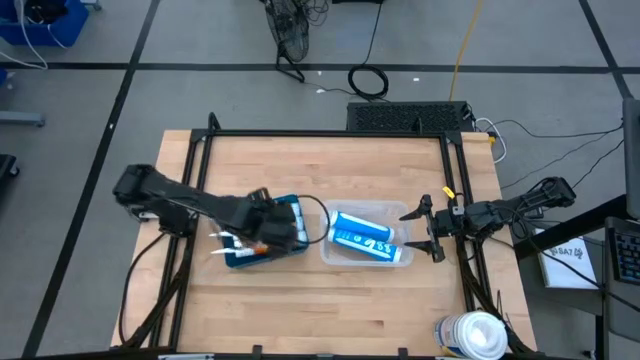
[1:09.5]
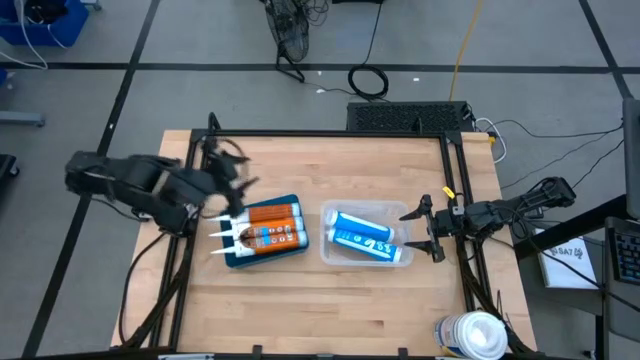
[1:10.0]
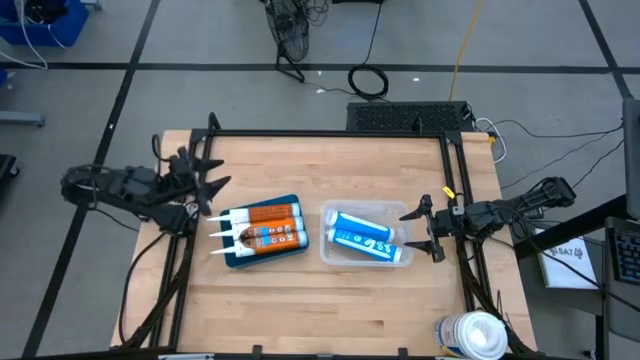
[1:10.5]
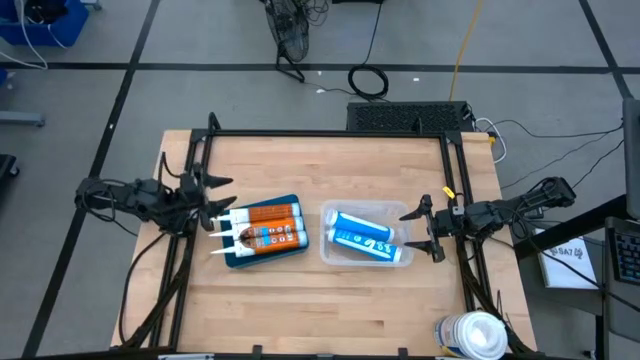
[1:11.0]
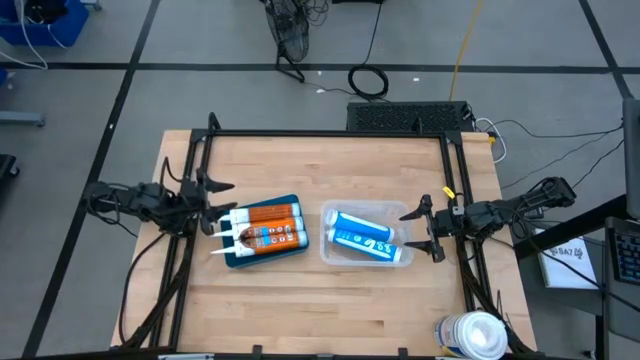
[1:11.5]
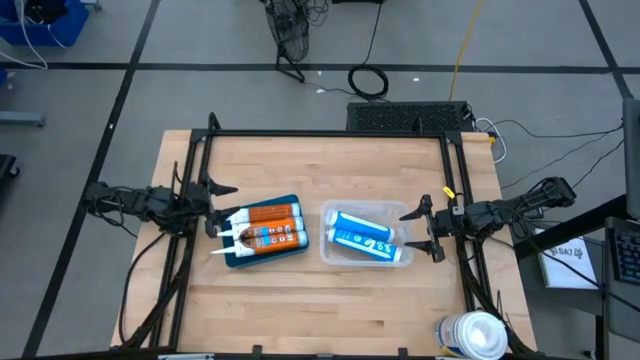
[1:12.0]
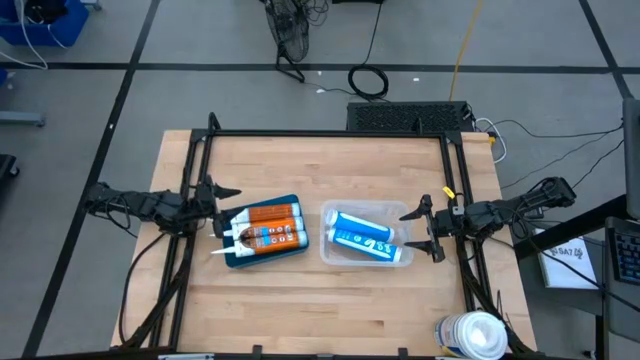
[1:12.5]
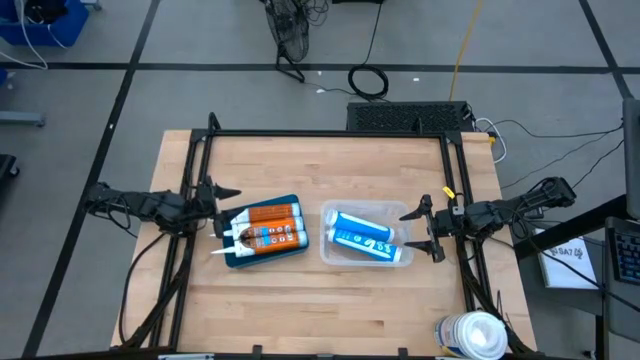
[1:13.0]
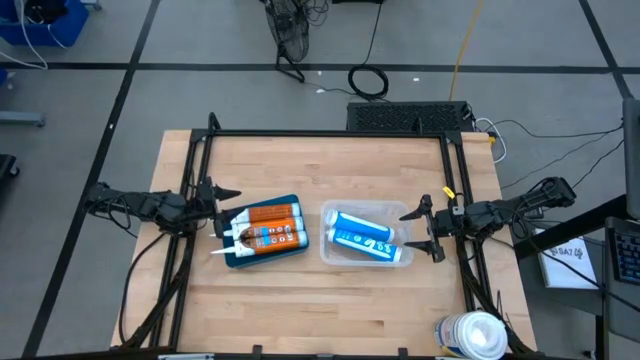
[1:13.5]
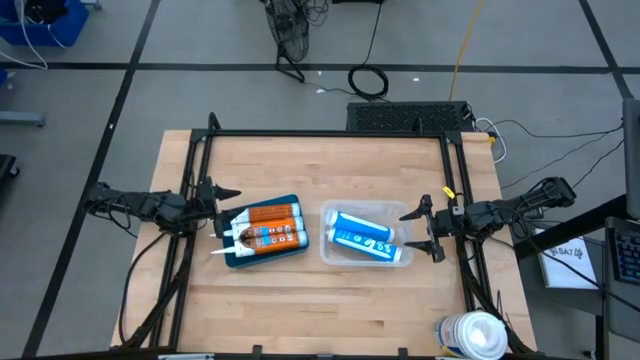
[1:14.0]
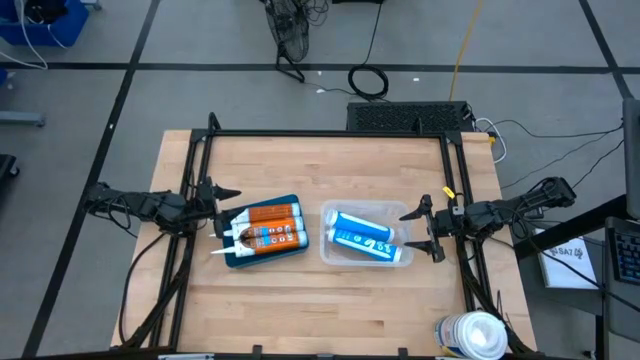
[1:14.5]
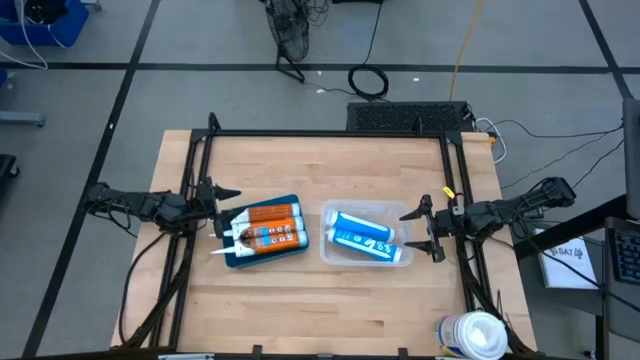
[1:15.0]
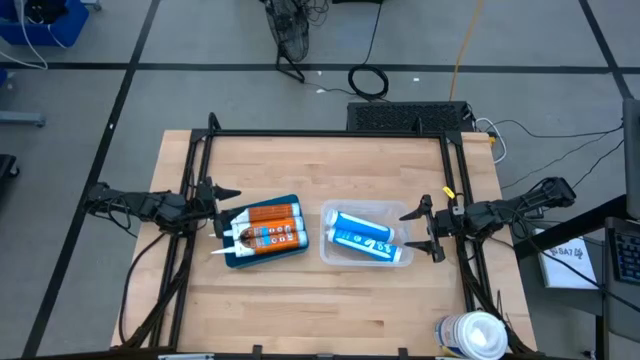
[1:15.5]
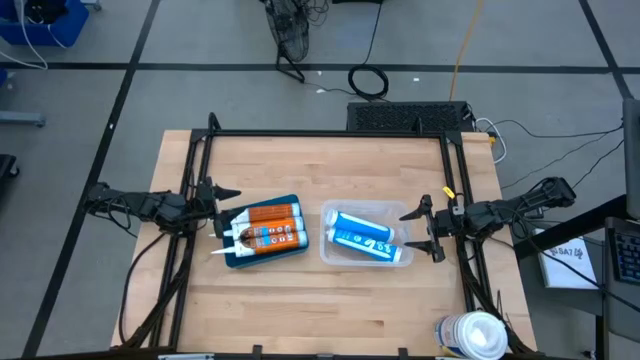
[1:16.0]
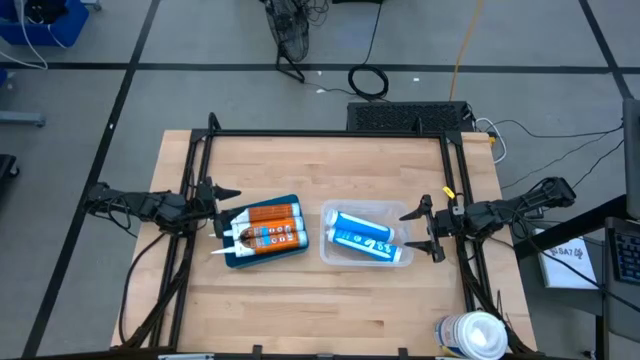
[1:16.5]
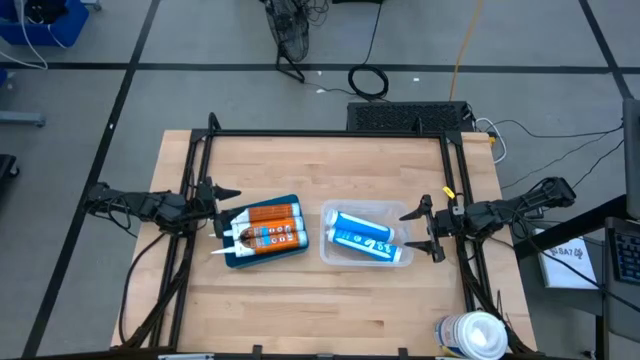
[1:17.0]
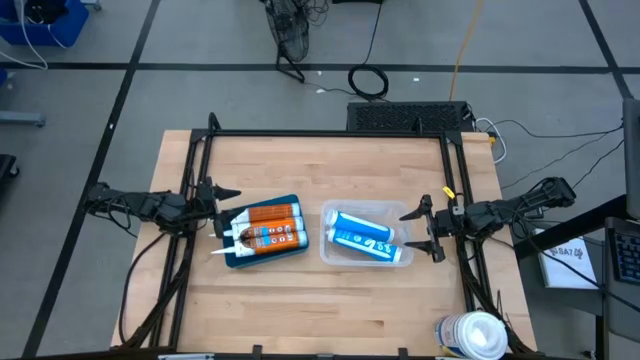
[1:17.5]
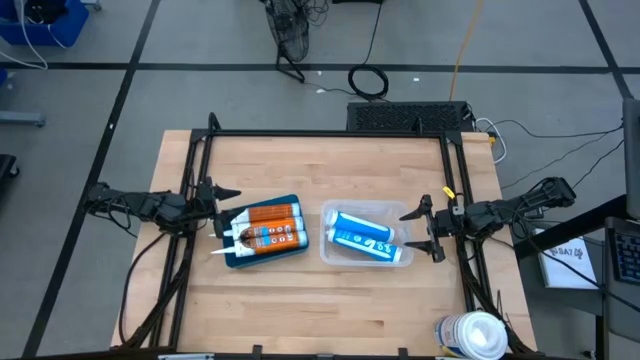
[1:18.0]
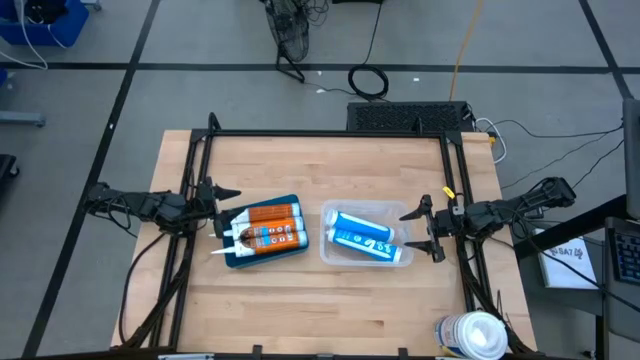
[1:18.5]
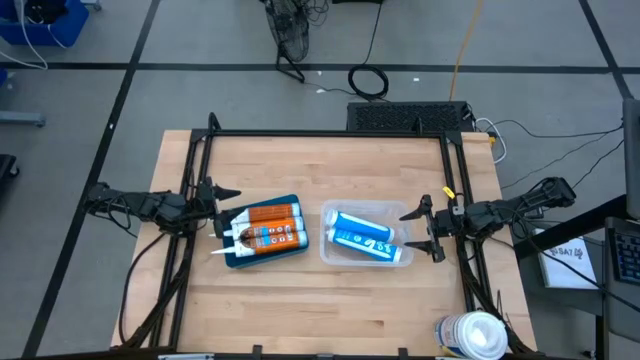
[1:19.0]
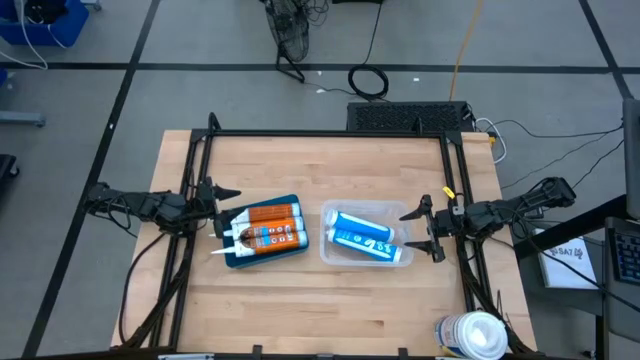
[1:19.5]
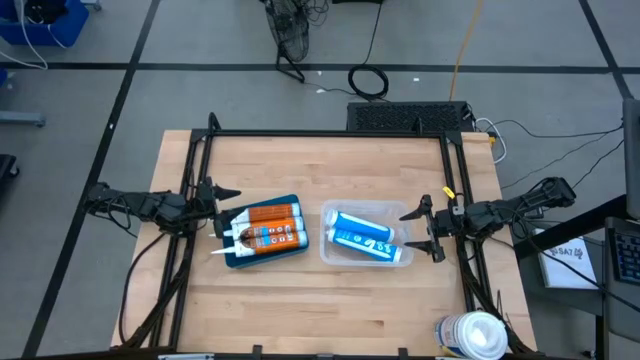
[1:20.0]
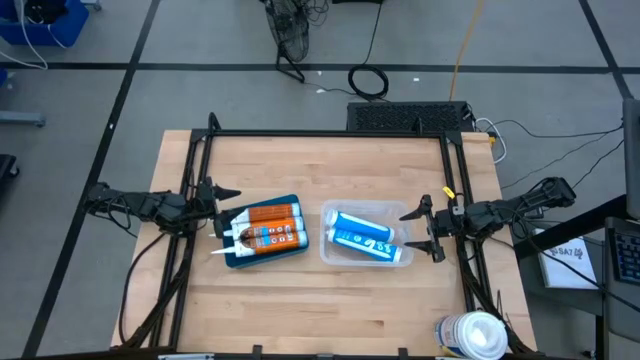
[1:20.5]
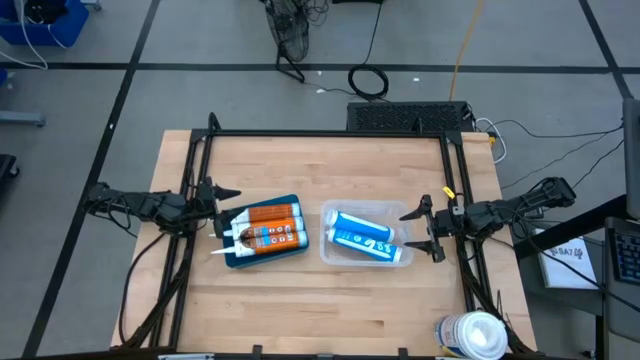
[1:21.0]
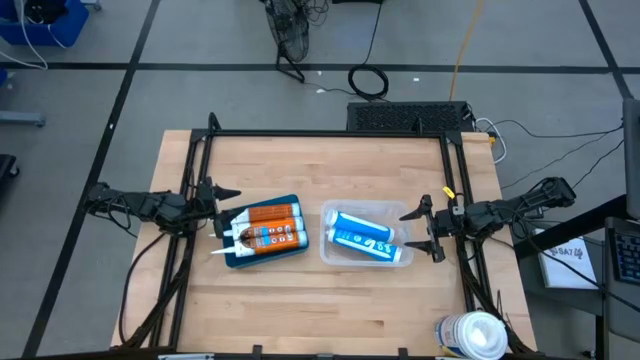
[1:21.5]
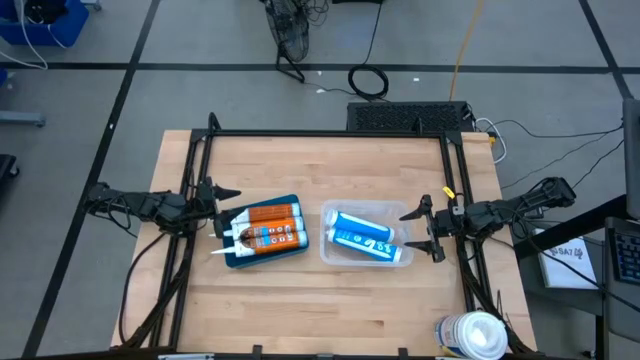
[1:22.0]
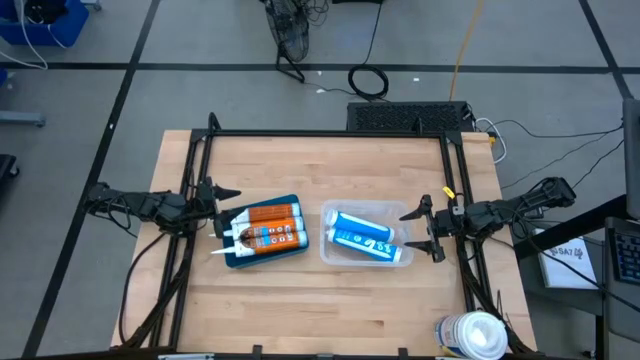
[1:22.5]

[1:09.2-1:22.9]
Task: Pick & place silicon tubes, Sealant and Lysol wipes
Return to Home Position

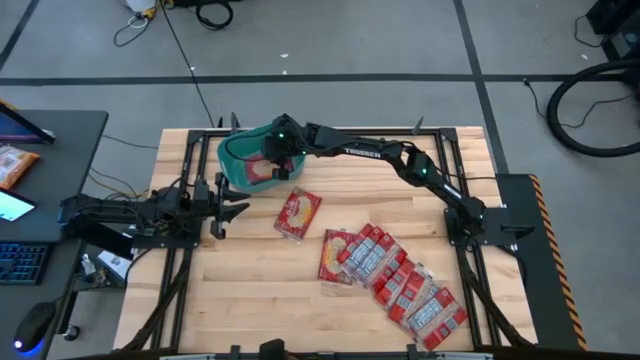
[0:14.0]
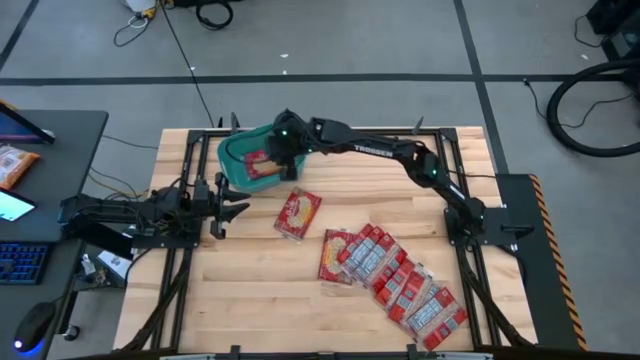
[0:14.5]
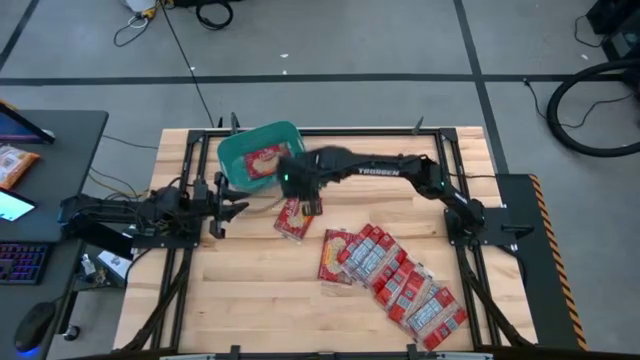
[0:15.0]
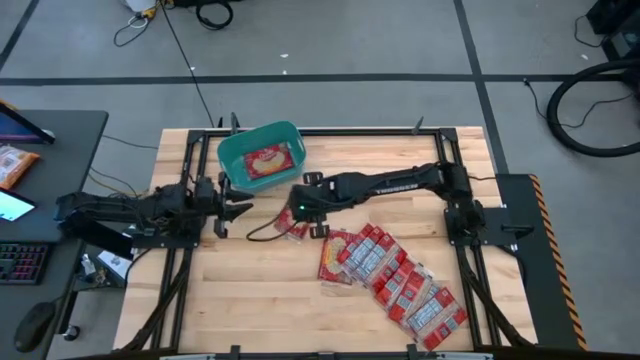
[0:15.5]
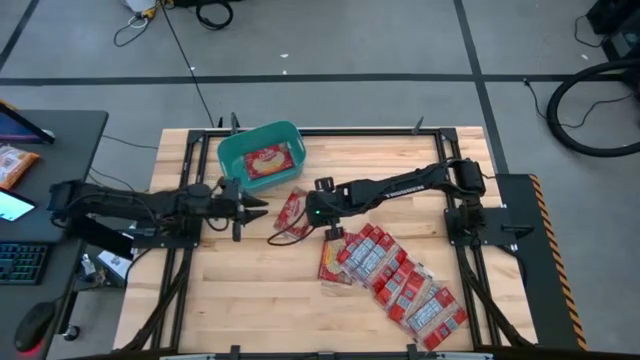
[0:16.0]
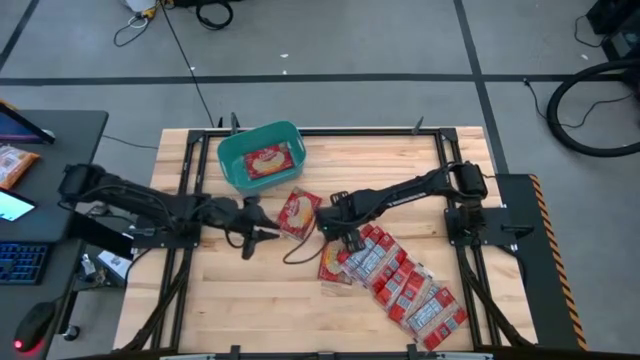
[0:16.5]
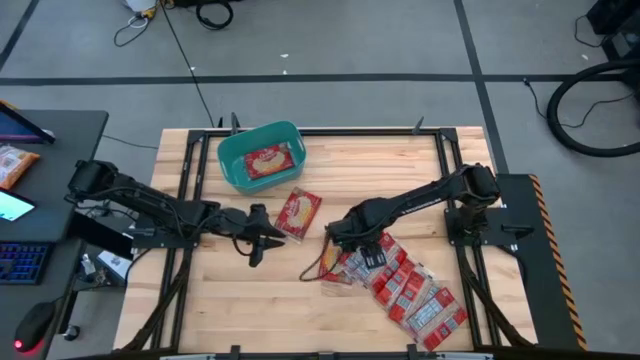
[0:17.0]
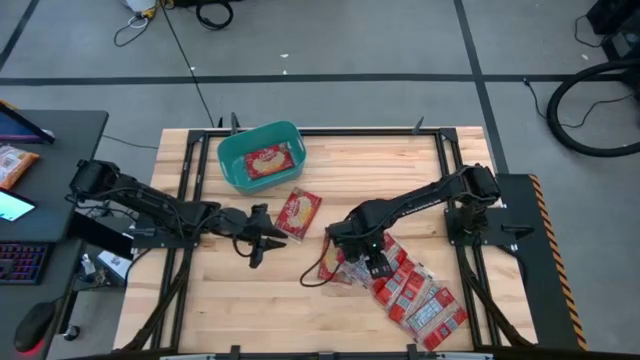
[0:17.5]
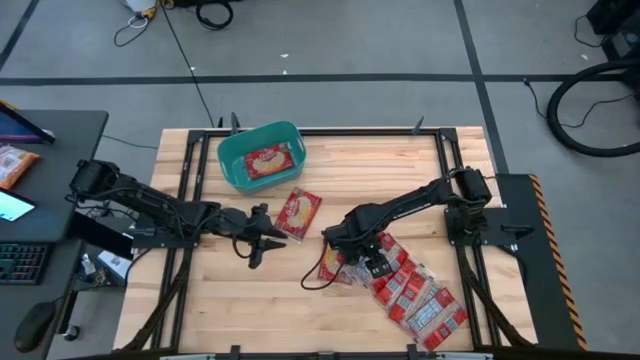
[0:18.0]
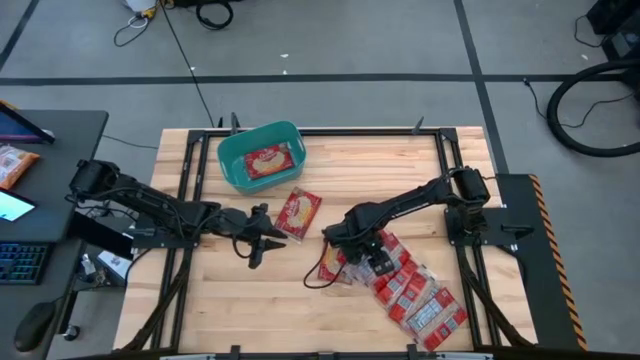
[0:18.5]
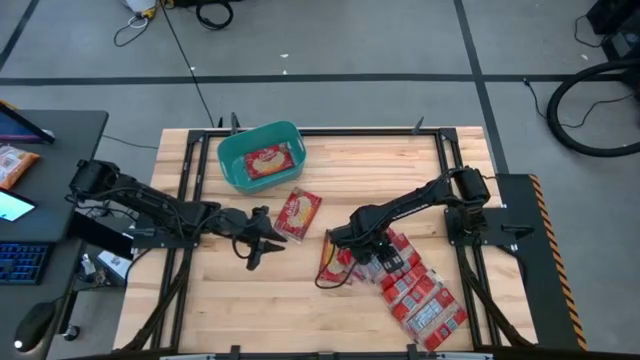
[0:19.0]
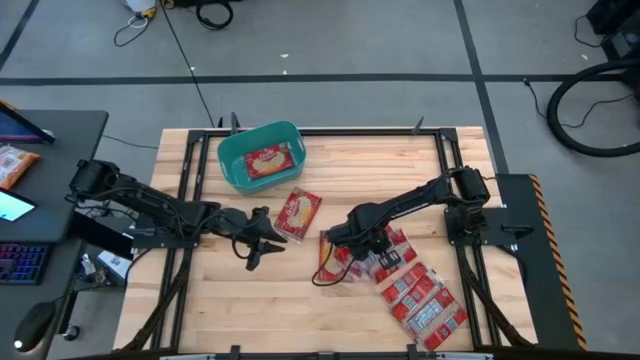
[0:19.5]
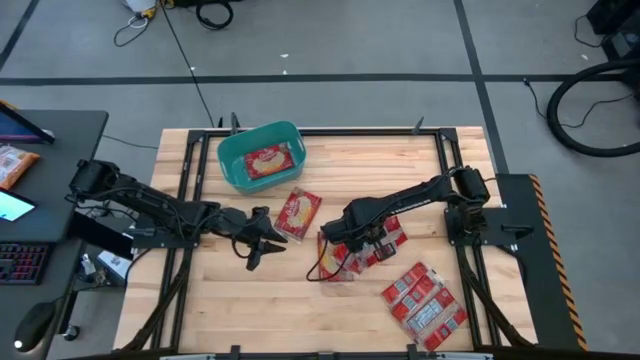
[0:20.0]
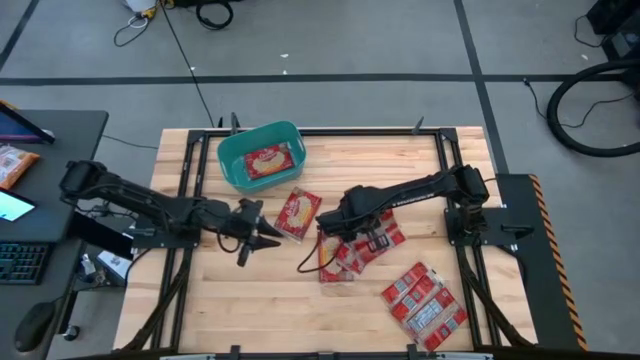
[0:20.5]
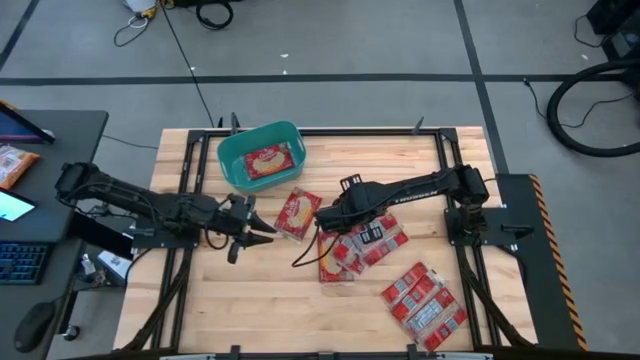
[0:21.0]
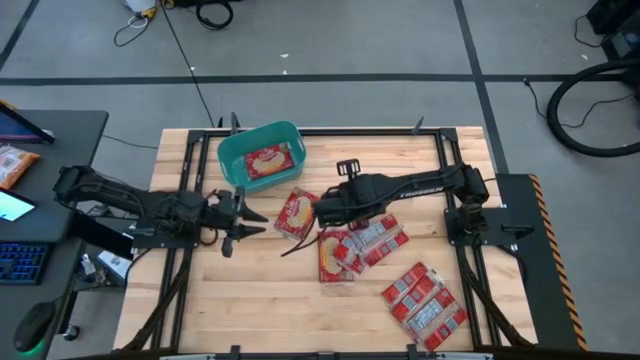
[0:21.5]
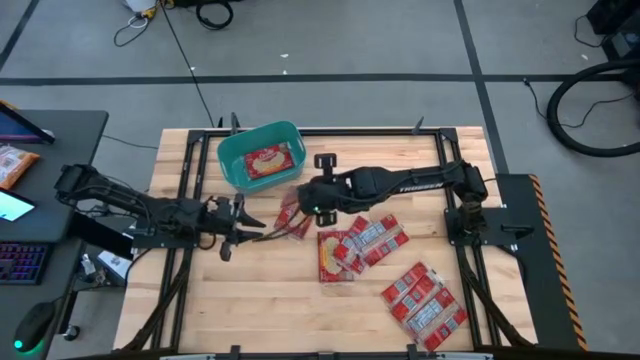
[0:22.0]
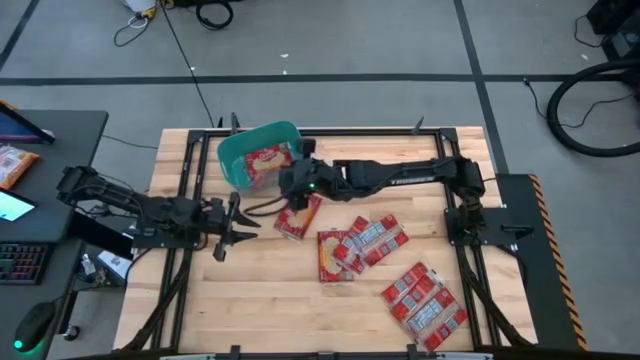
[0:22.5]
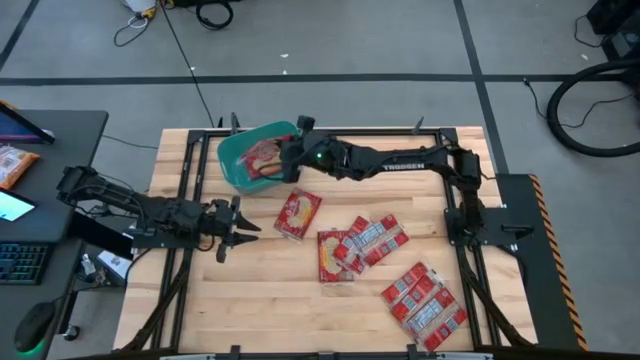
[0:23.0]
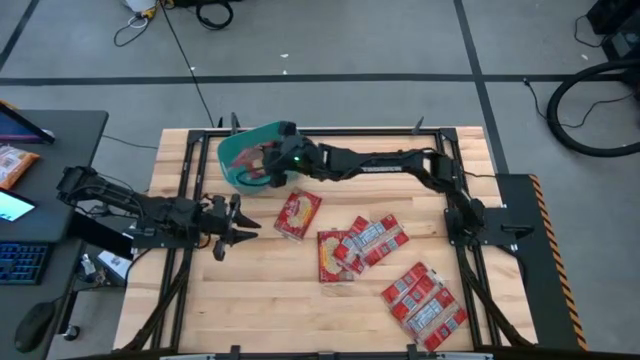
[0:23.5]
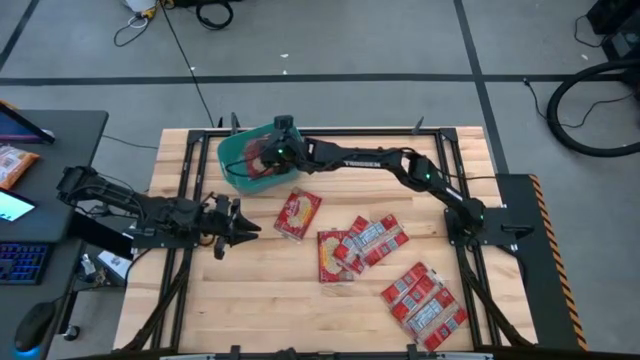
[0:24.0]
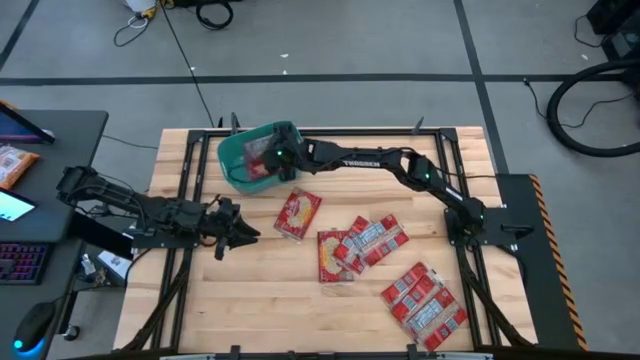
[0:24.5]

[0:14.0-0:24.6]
Task: Sort popcorn bags into baskets
Put the popcorn bag into the green bin
